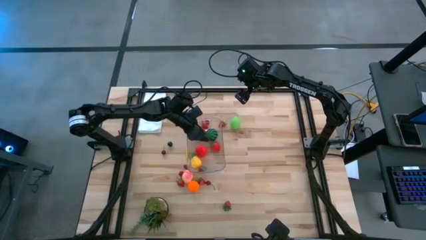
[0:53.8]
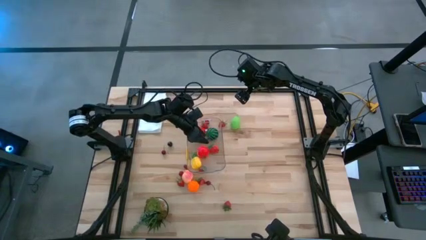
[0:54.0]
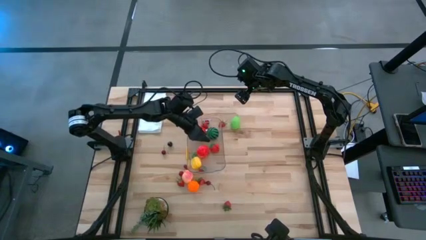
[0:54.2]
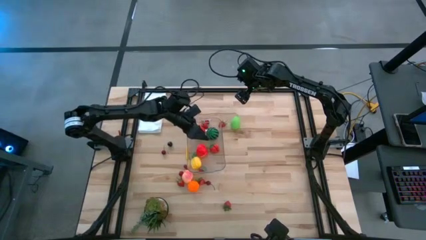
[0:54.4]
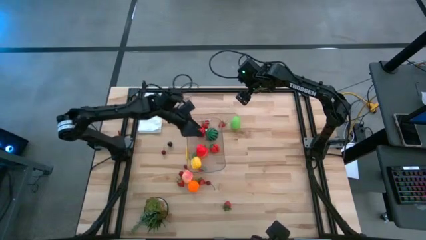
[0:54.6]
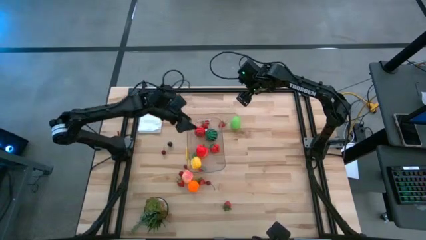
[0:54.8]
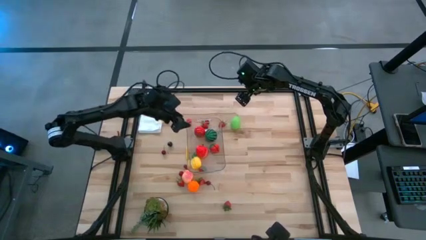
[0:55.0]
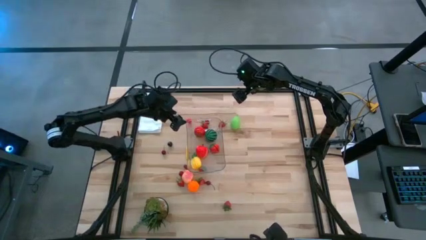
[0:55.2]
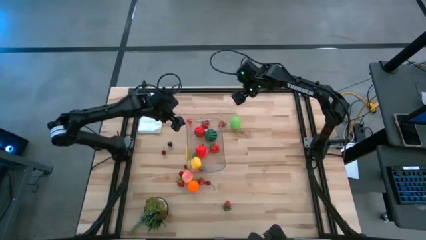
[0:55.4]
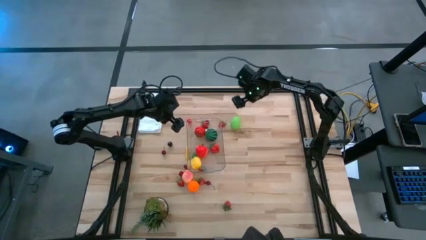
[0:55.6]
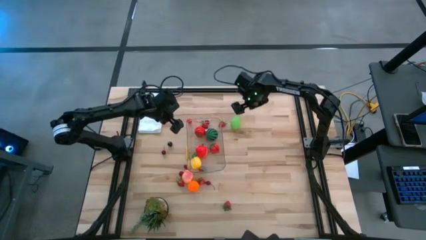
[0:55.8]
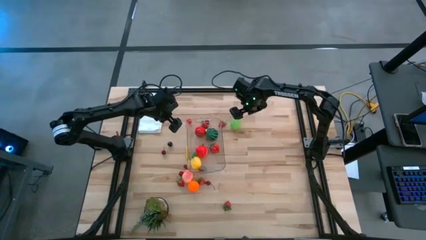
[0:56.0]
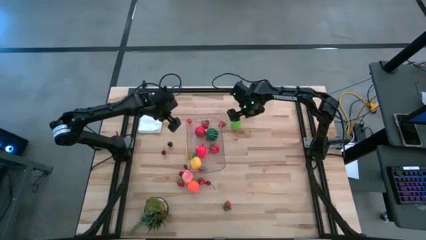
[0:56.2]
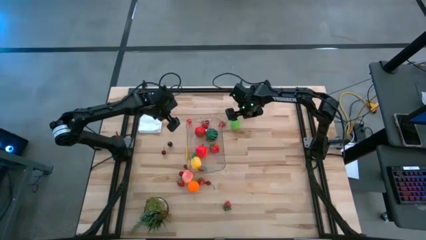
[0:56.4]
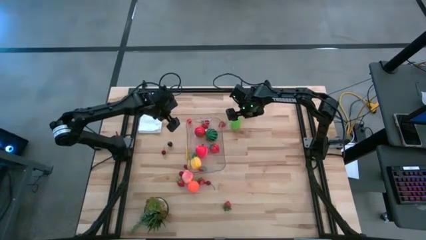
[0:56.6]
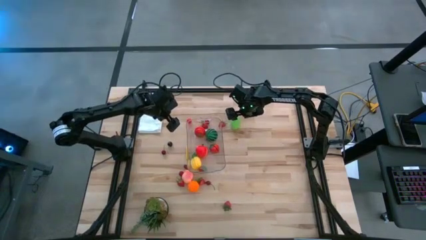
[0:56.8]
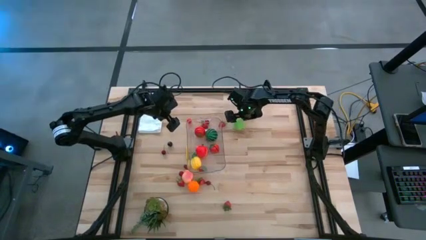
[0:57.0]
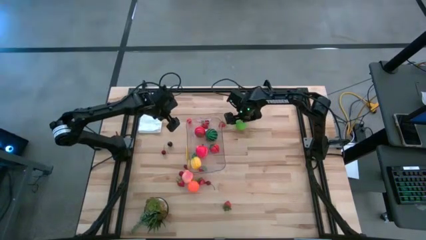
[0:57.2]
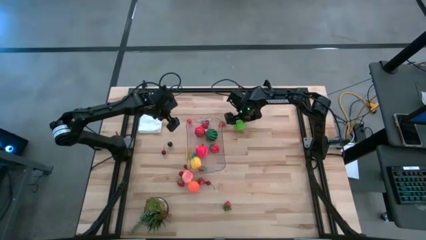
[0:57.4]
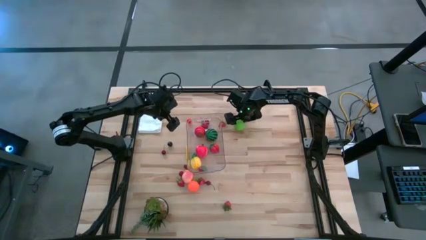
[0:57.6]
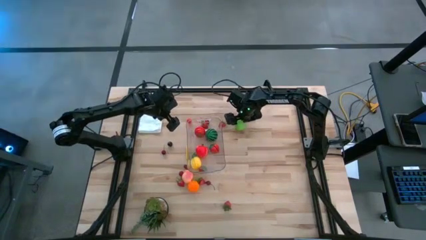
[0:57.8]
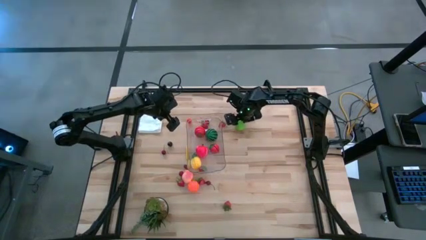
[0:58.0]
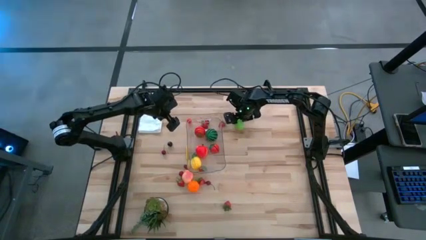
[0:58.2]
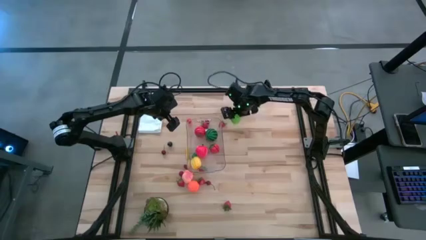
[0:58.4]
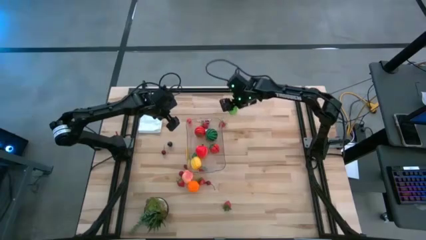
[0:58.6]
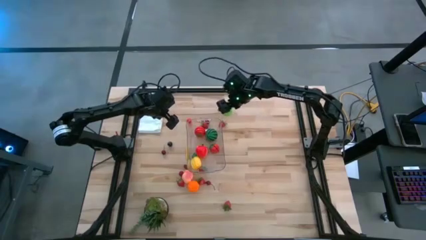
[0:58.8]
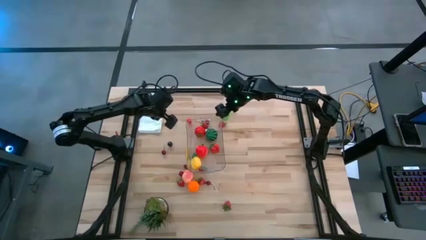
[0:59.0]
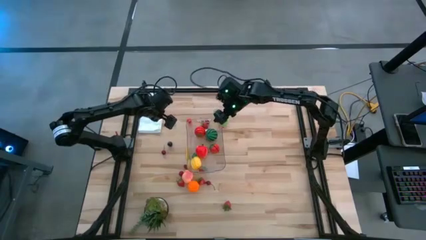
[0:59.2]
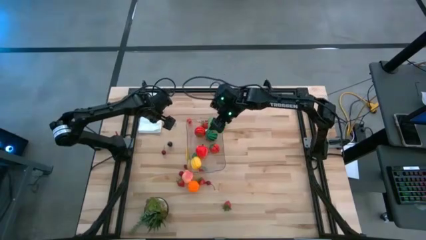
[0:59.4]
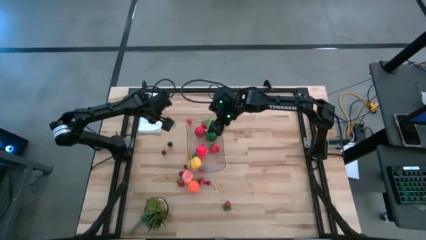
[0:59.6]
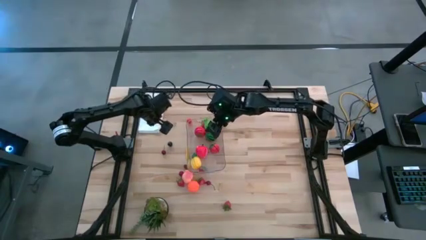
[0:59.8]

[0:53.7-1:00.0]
Task: Pick and placing Produce into tupperware
Put the melon into the transparent bin

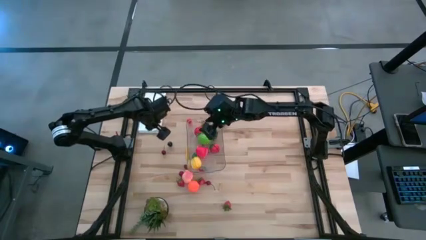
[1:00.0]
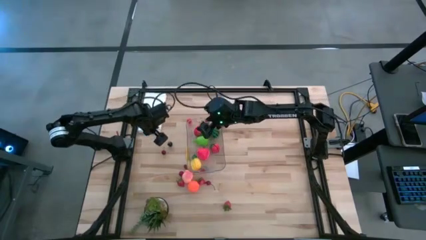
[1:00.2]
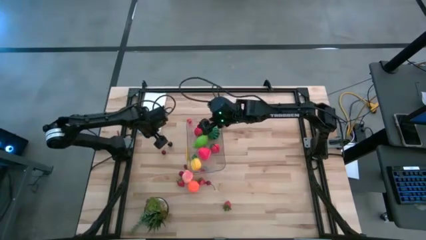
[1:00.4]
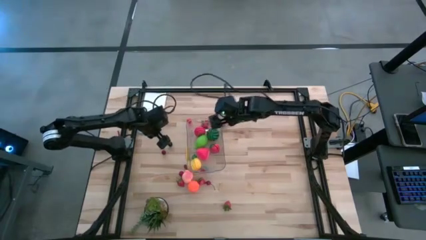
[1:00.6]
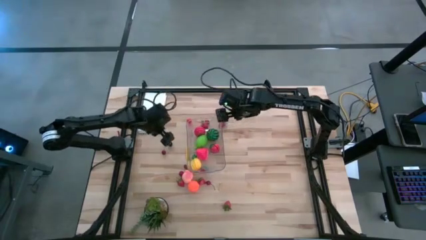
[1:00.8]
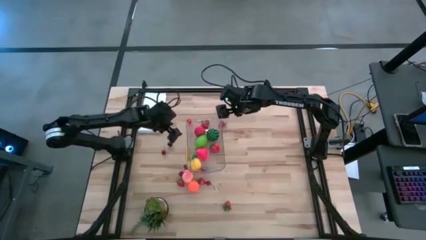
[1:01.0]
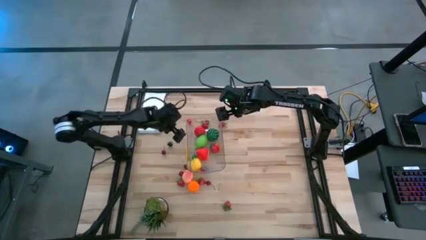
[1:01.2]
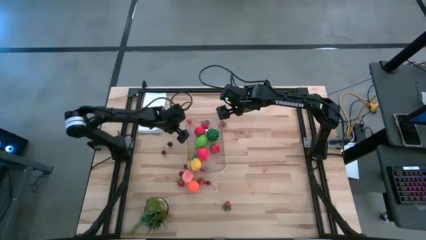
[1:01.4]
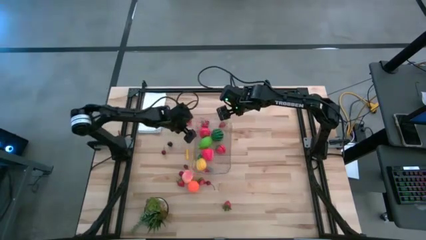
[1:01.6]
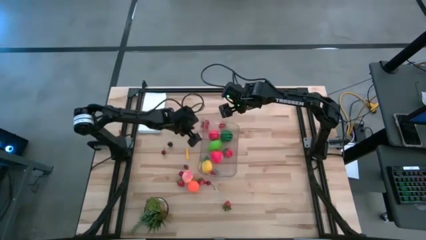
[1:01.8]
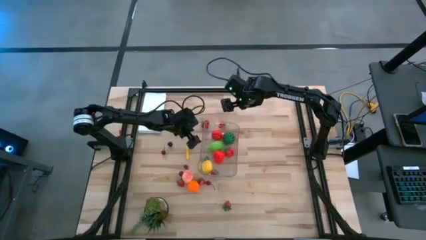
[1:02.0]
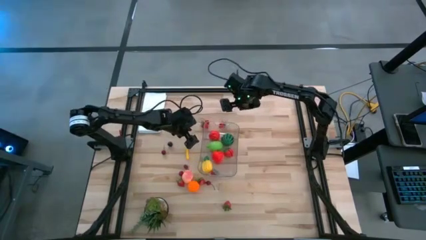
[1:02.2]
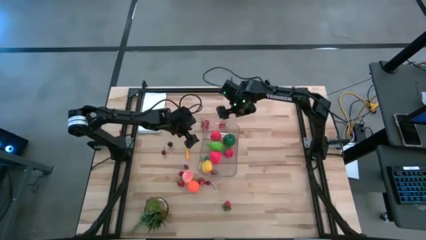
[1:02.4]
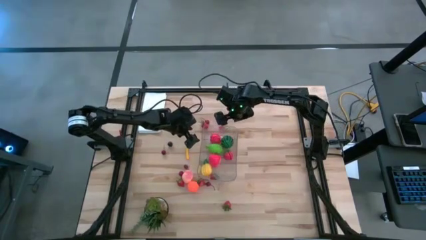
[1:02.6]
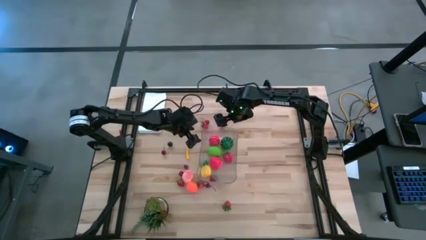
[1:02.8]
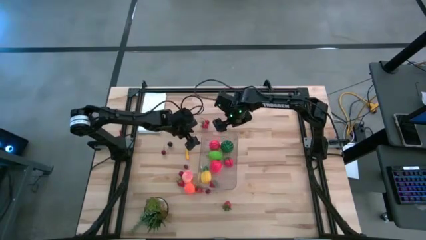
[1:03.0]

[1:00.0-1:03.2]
Adjust the transparent bin

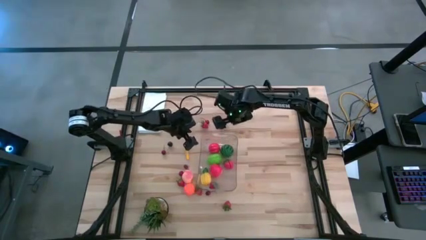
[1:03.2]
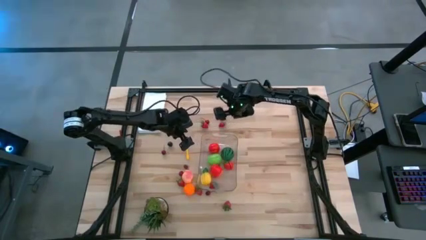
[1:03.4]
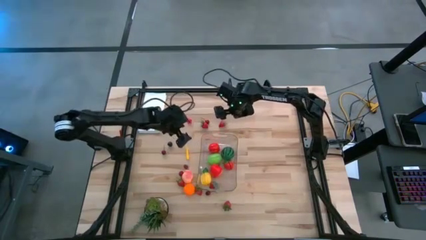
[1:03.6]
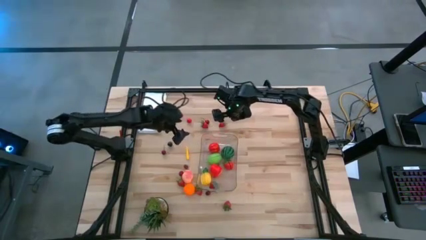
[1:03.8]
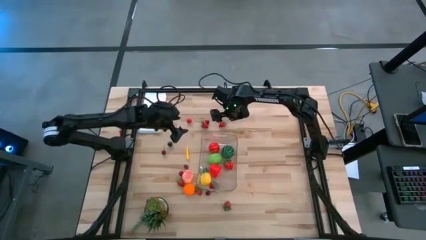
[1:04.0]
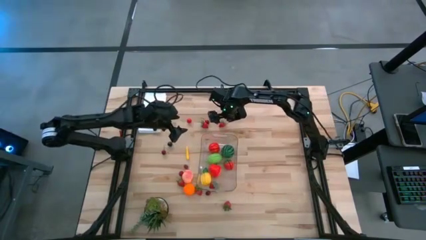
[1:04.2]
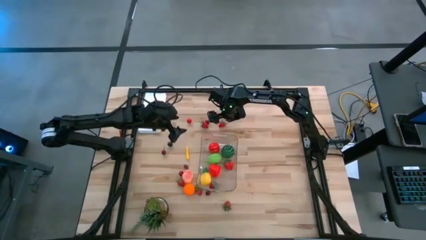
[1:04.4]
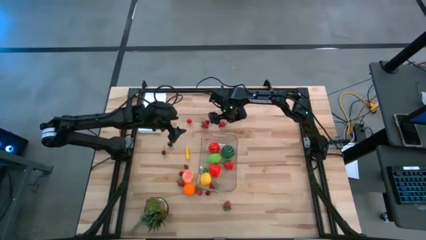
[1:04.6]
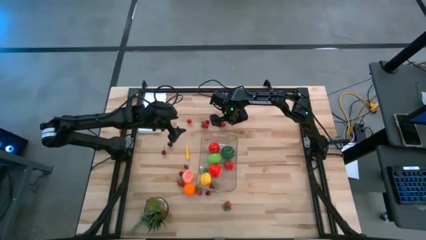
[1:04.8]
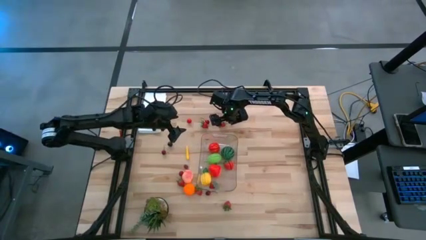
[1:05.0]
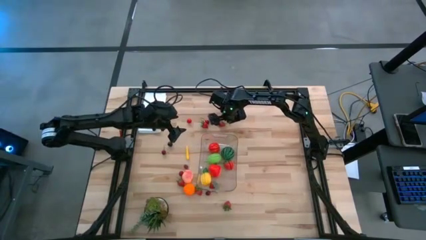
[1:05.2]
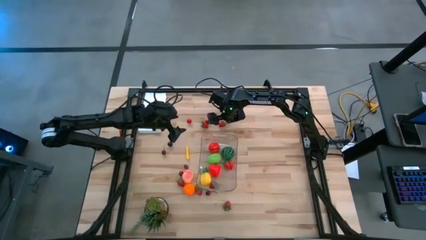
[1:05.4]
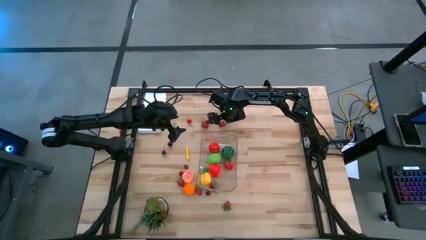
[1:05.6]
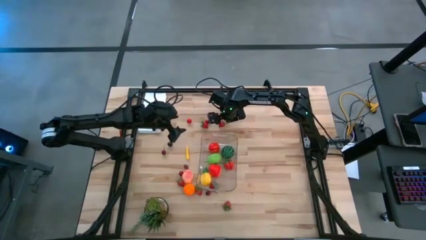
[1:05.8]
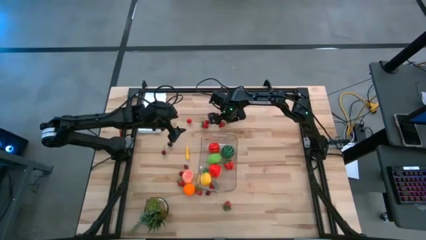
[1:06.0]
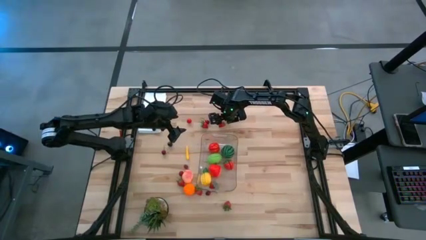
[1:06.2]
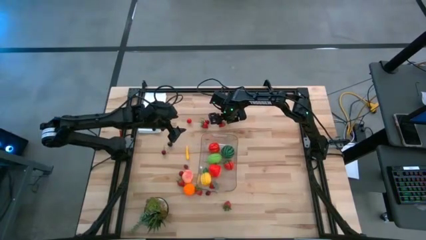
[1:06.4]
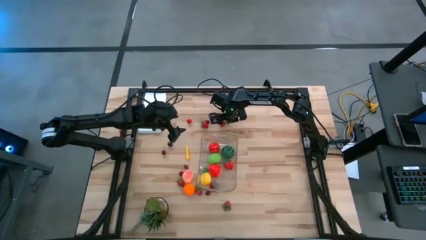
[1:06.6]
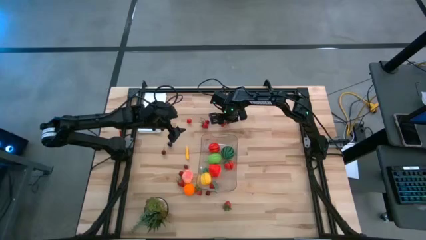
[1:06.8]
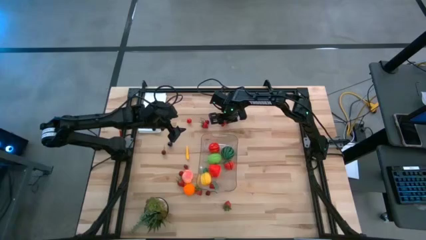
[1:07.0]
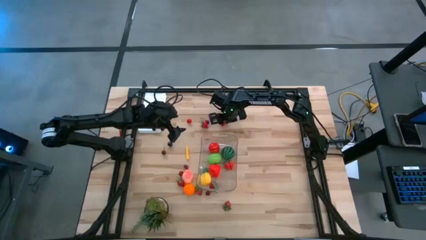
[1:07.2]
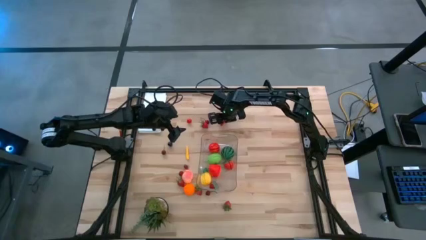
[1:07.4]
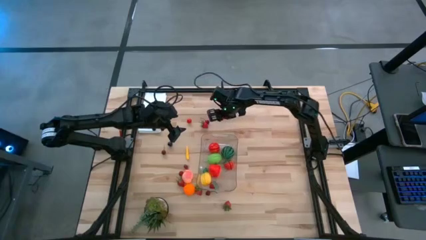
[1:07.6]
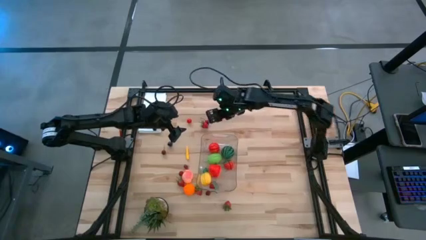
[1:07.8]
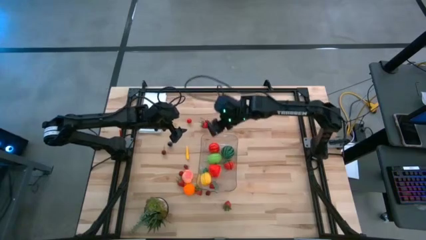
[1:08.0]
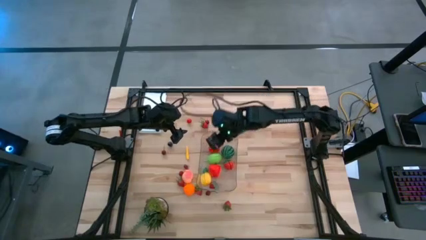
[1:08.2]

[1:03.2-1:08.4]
Put the strawberry into the transparent bin
